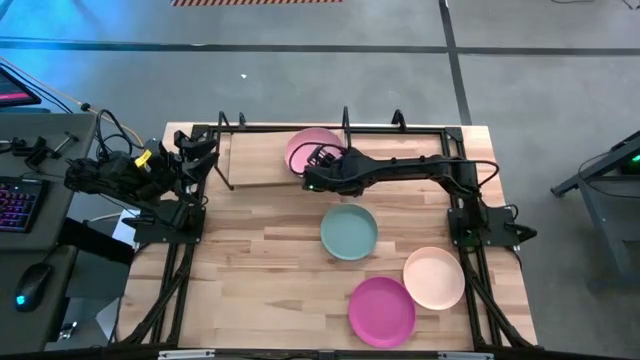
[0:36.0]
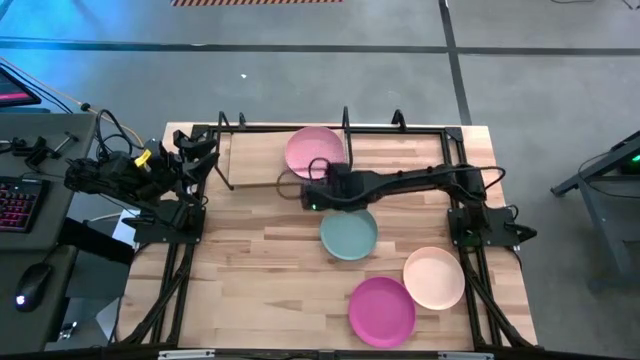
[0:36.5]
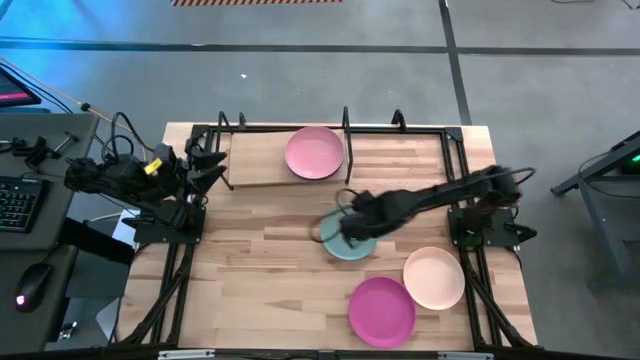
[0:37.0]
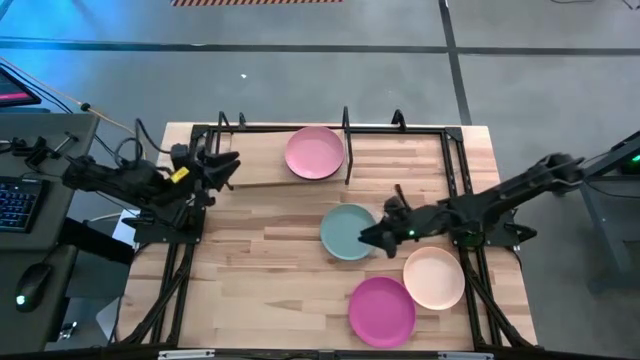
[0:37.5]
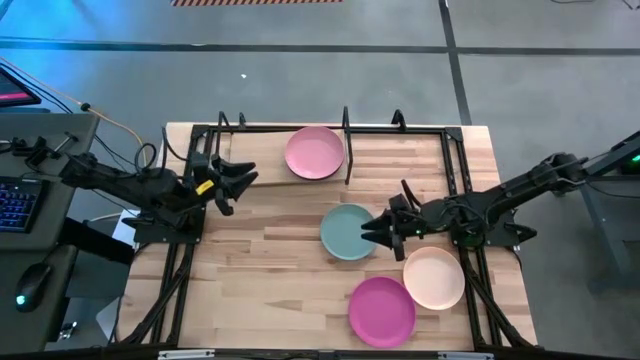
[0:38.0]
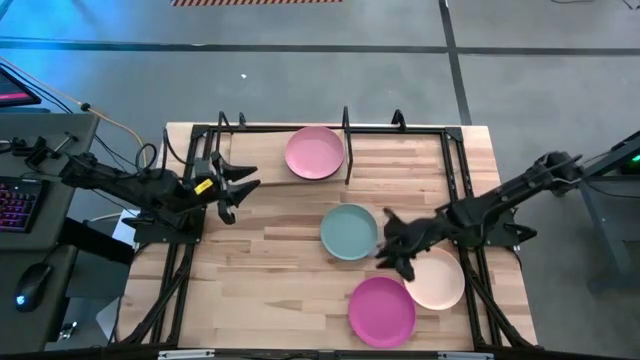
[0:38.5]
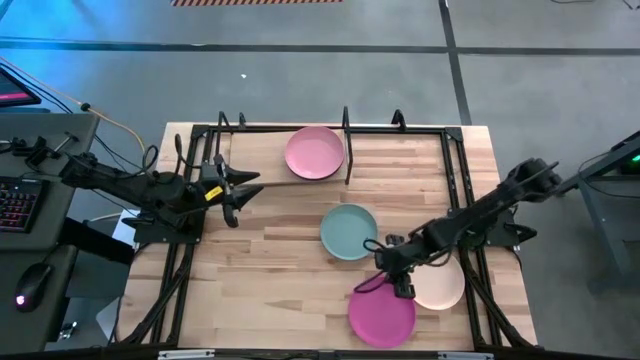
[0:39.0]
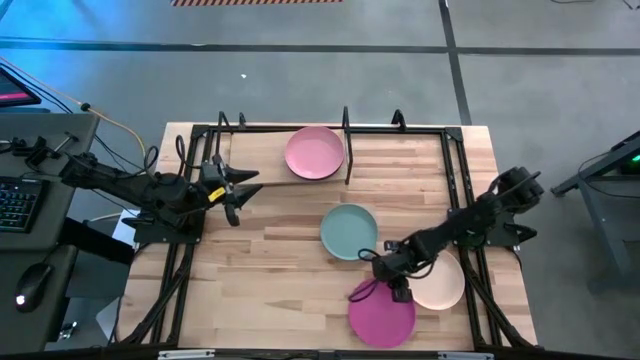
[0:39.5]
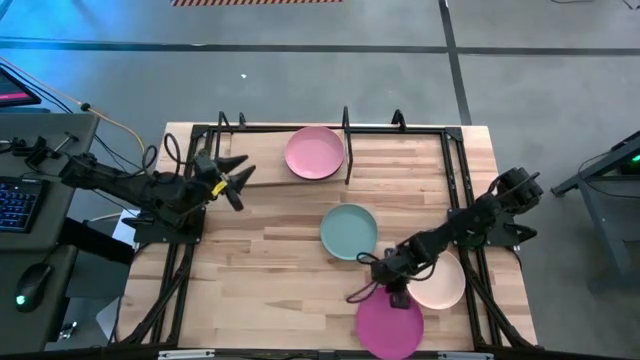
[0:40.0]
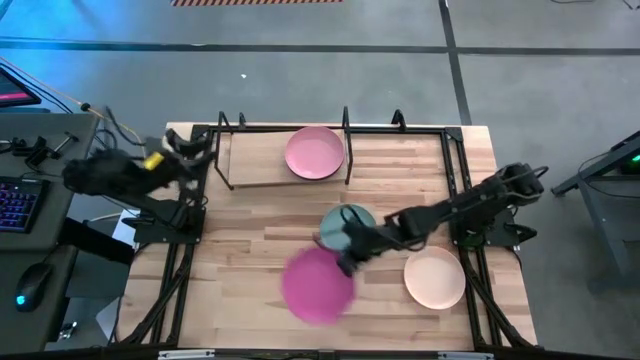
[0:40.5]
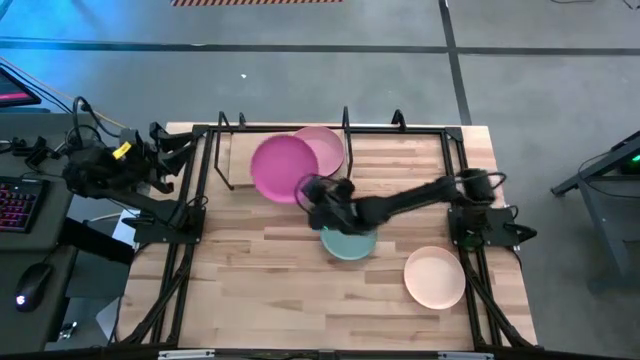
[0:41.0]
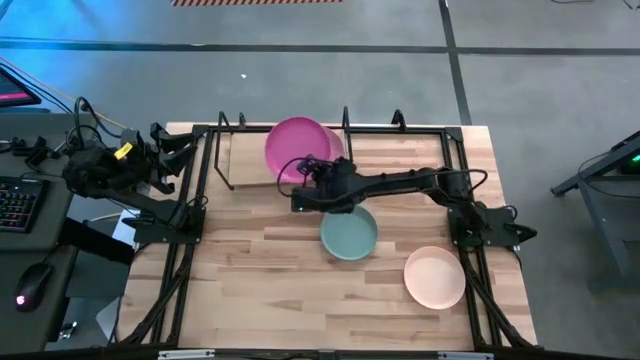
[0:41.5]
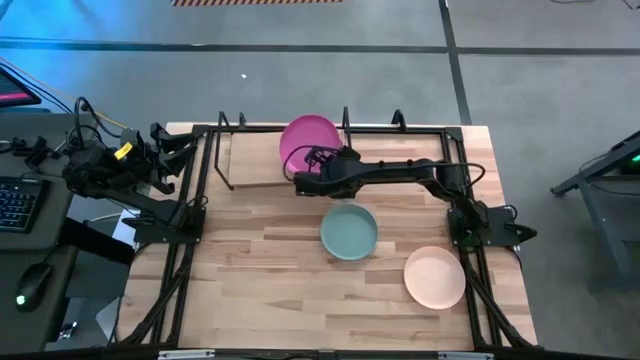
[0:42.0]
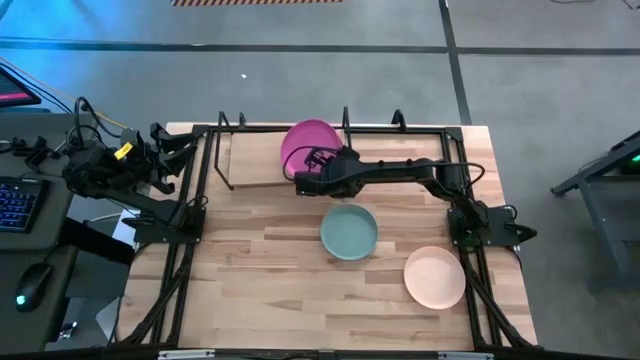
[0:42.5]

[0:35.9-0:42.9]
Task: Place and stack plates onto a shelf
Stack the pink plate on top of the light pink plate on the shelf

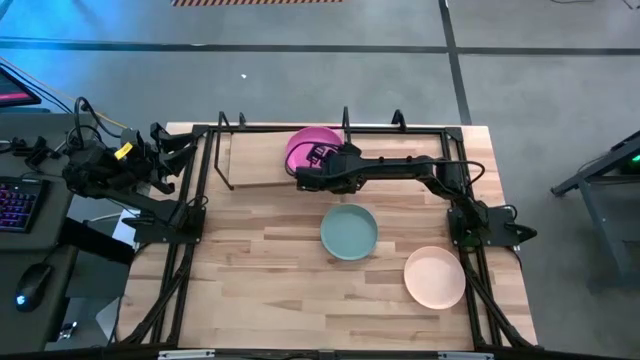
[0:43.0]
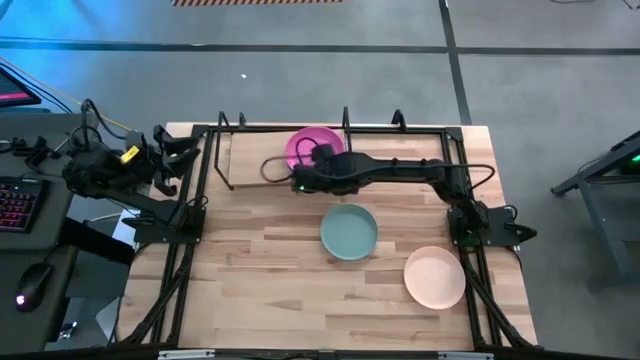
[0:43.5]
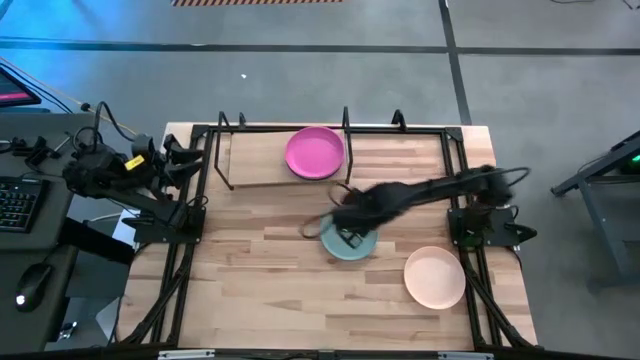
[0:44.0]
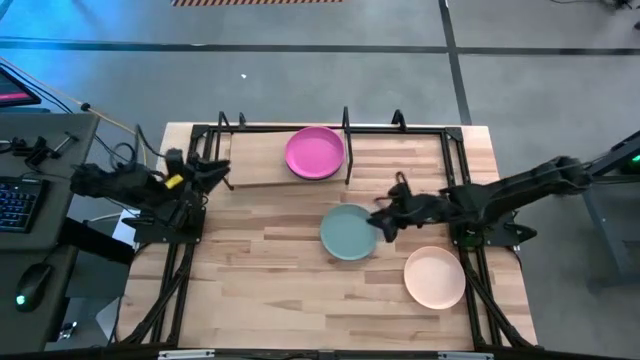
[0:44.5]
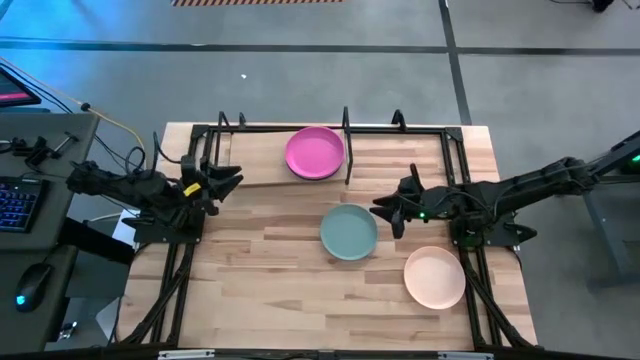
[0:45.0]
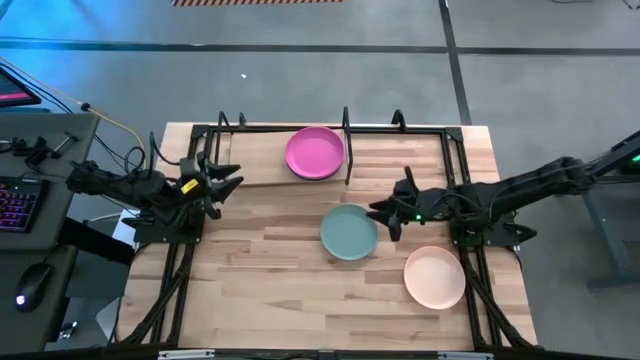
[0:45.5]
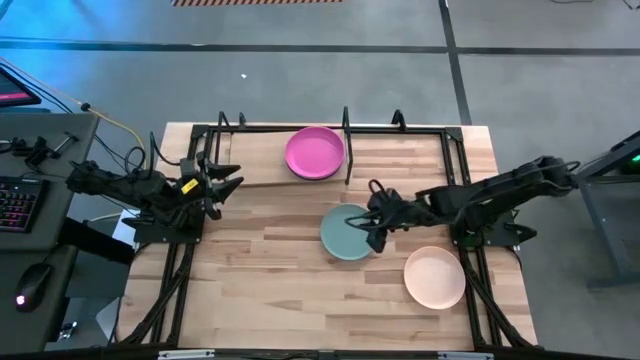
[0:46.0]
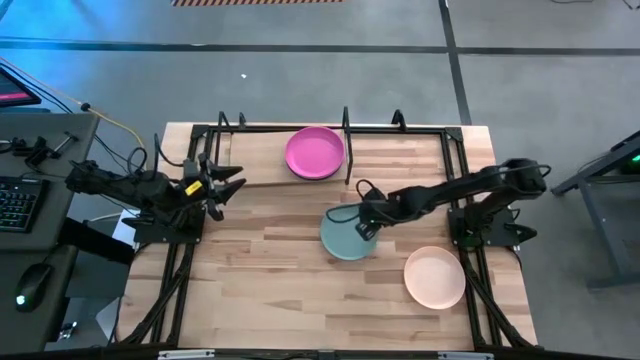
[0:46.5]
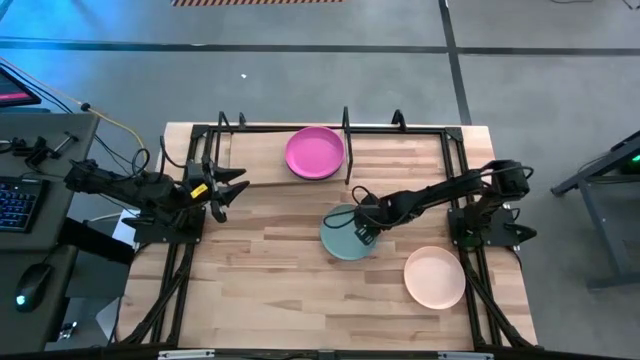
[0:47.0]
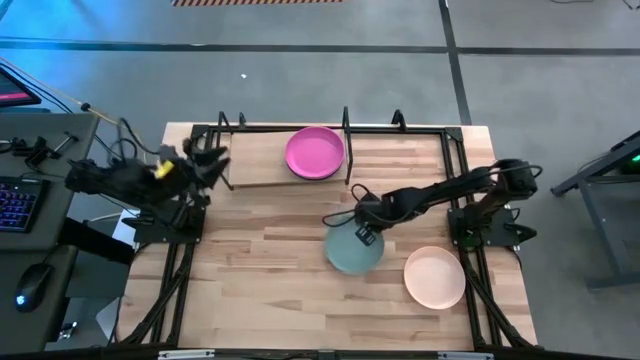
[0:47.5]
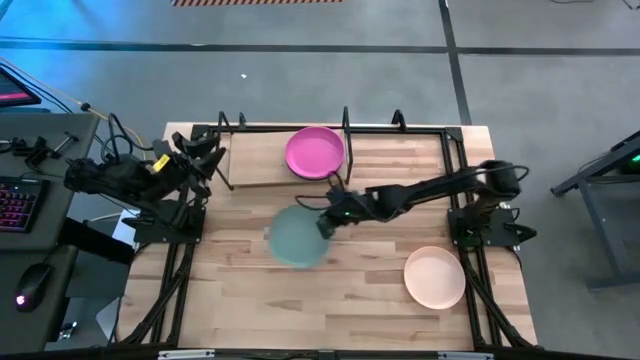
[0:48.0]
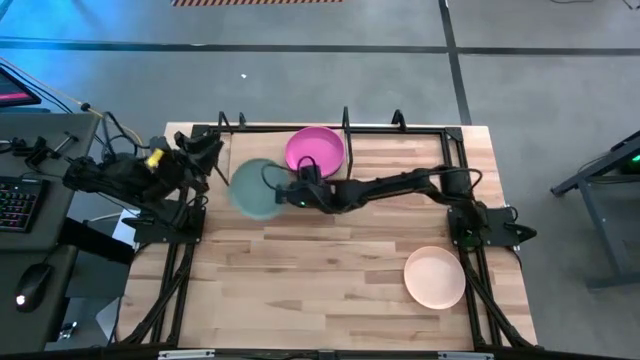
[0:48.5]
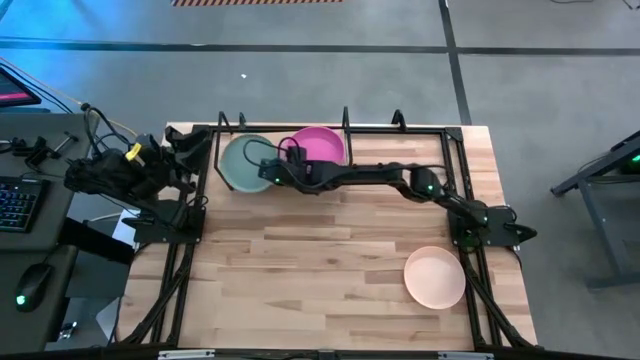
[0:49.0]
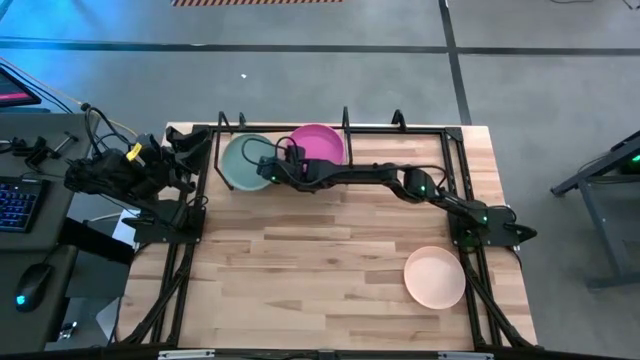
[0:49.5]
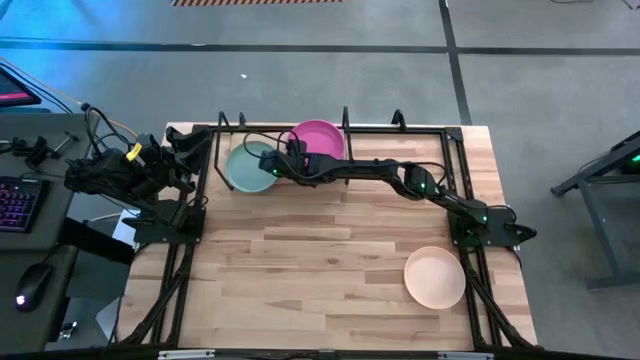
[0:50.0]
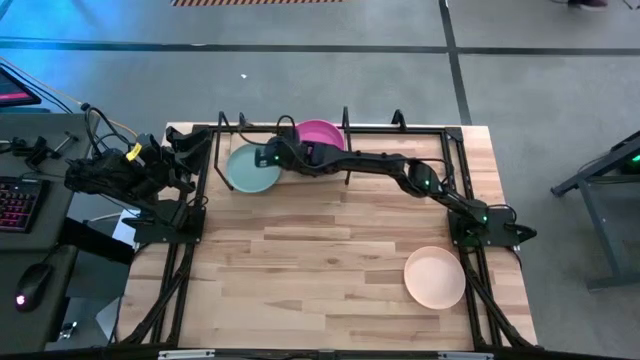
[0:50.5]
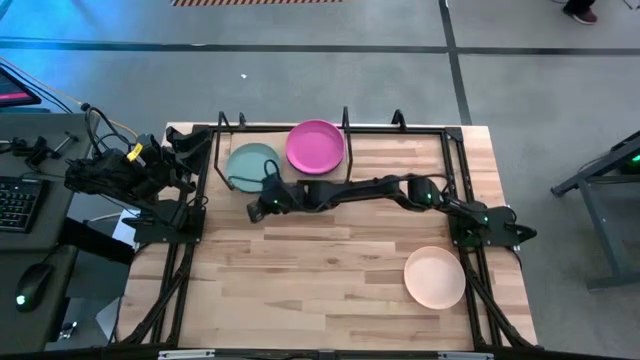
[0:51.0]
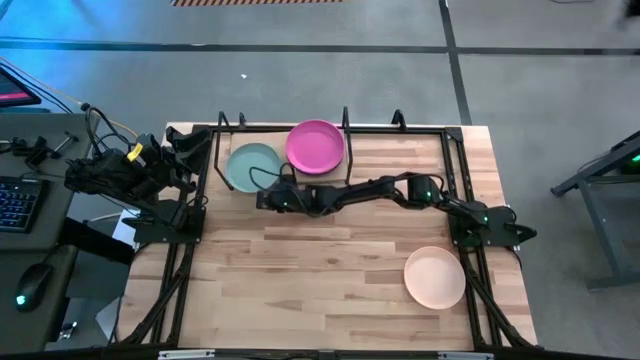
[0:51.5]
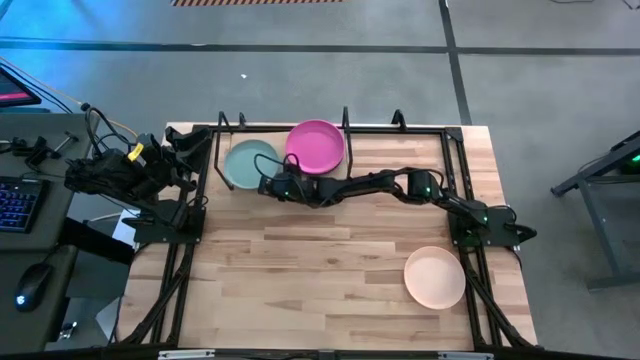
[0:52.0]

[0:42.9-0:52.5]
Put the green plate on the shelf

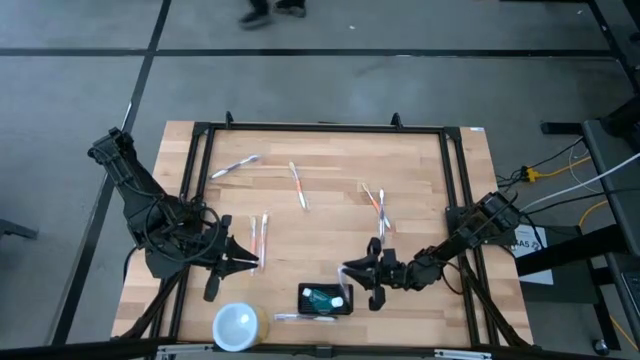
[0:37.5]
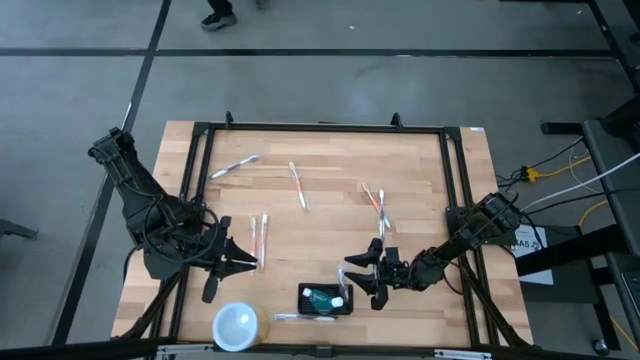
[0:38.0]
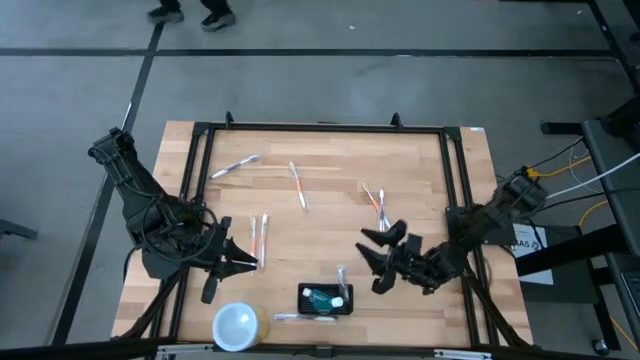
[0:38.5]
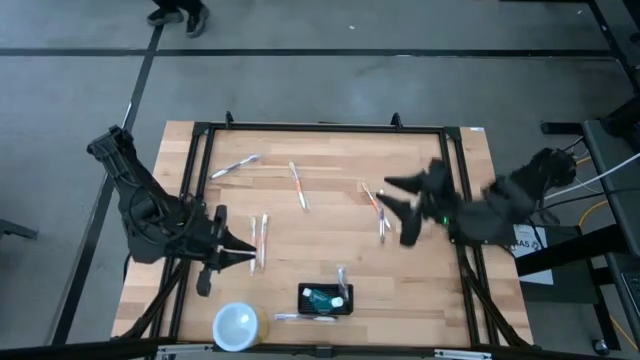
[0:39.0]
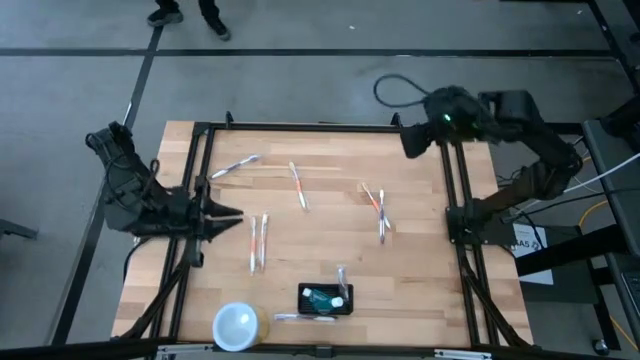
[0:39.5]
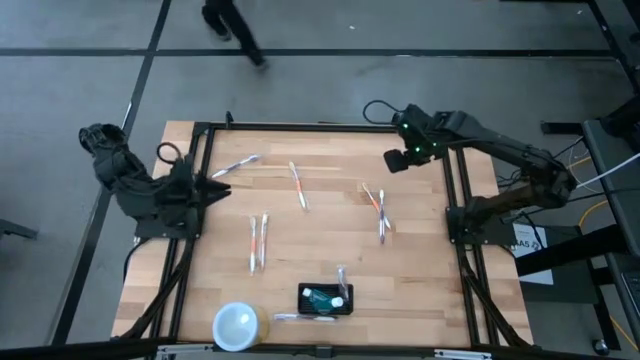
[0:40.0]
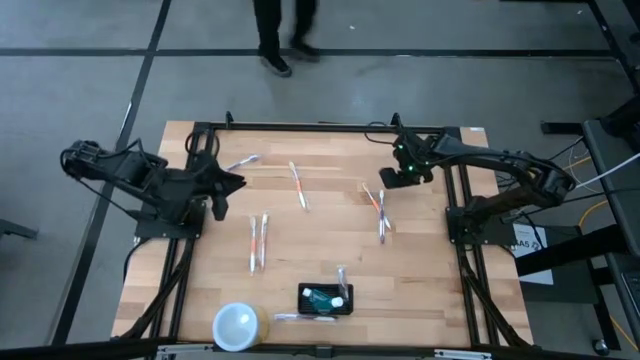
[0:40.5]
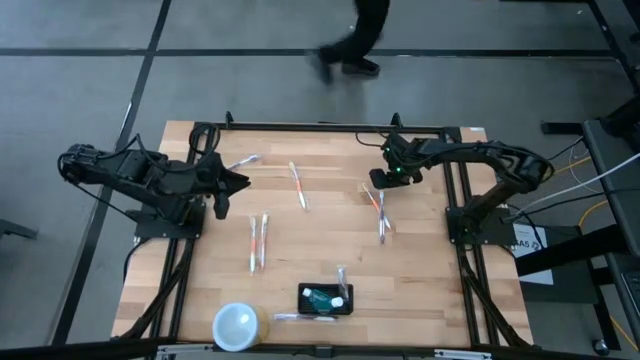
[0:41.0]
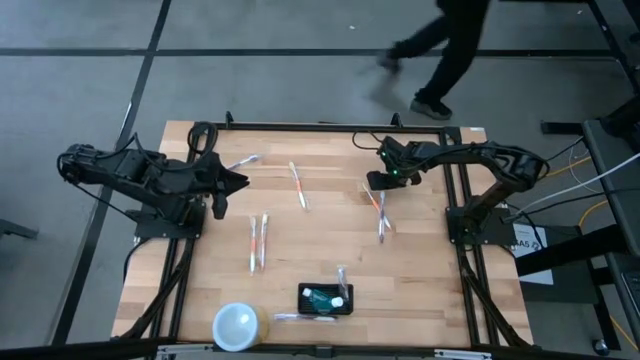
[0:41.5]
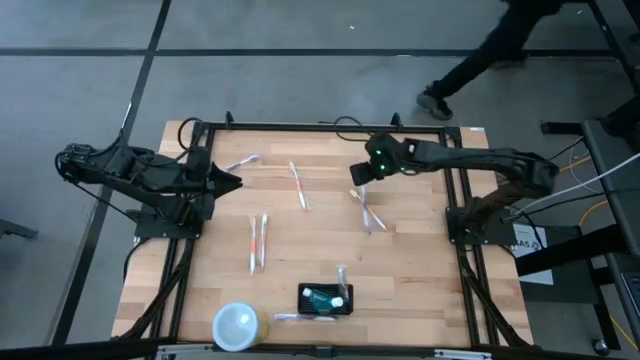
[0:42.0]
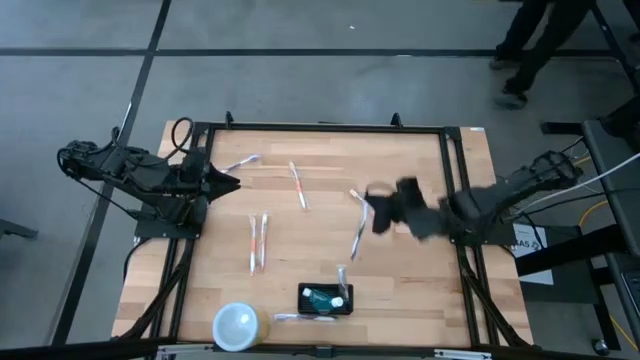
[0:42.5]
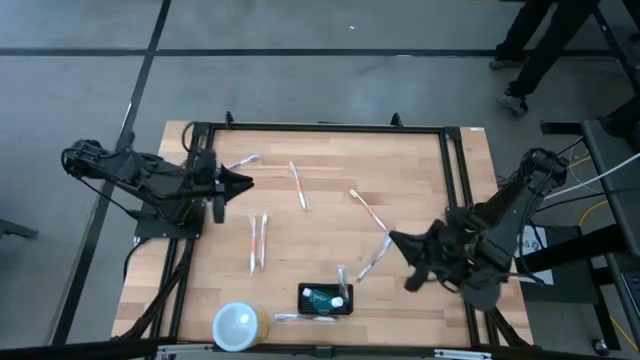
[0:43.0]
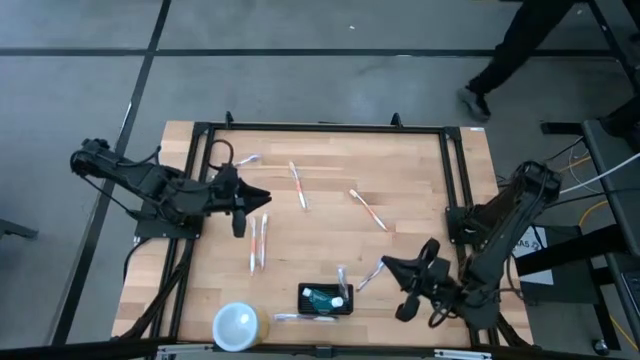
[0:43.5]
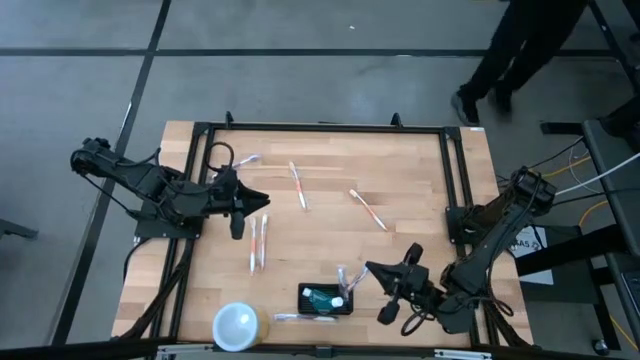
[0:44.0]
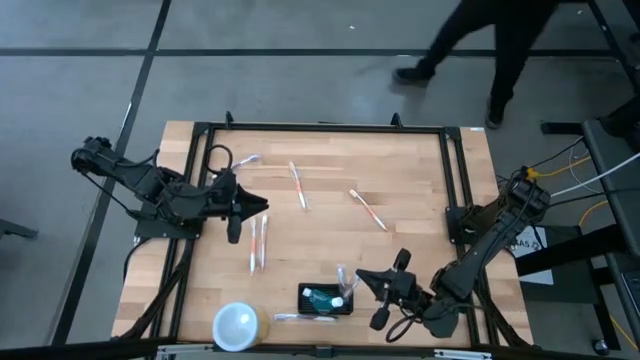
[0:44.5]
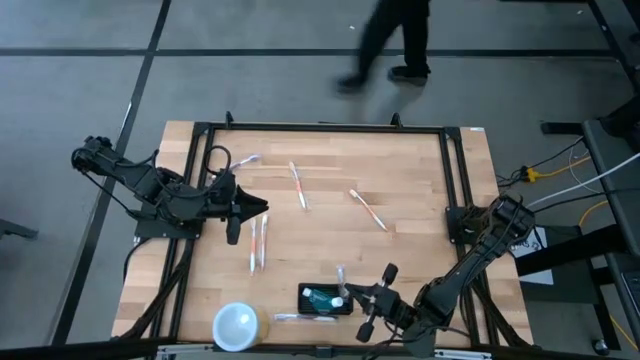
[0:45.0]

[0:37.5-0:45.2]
Task: Pick & Place toothbrushing station
Put the purple toothbrush into the mesh organizer
